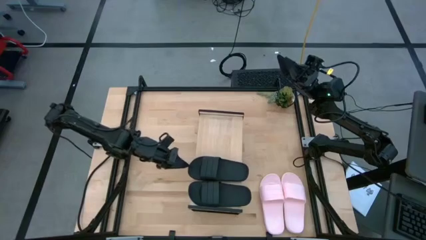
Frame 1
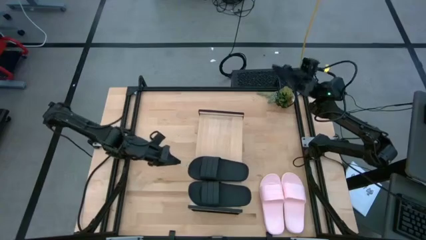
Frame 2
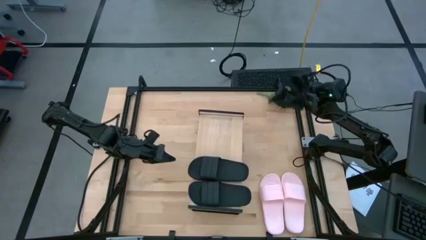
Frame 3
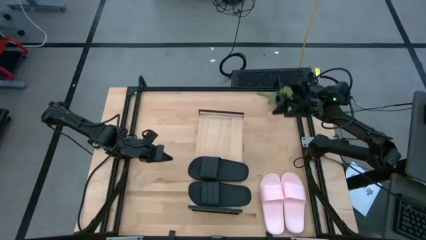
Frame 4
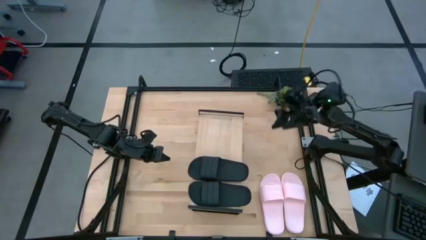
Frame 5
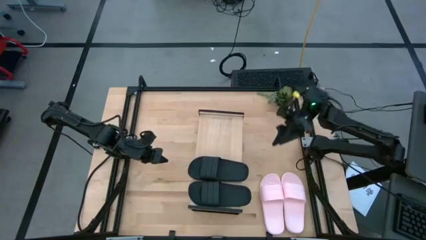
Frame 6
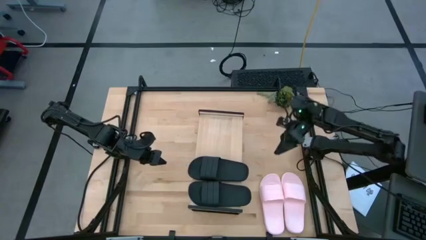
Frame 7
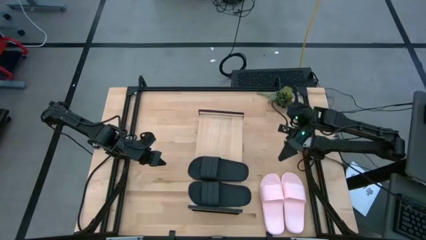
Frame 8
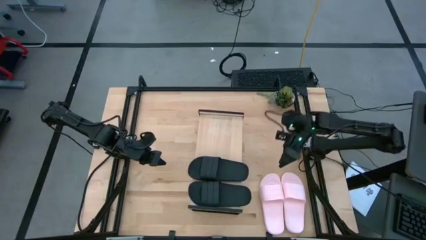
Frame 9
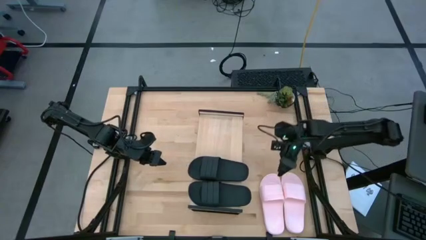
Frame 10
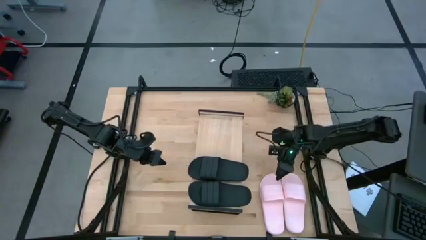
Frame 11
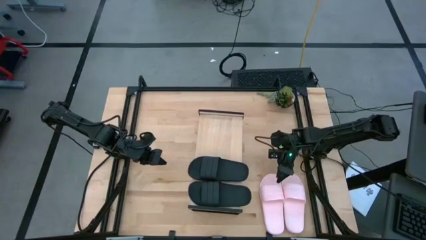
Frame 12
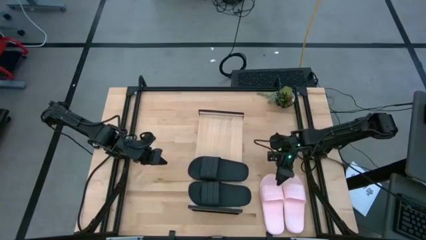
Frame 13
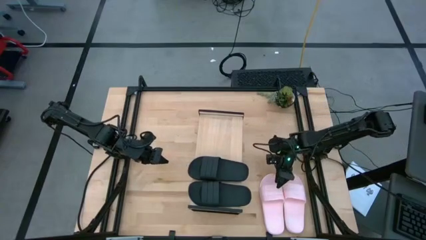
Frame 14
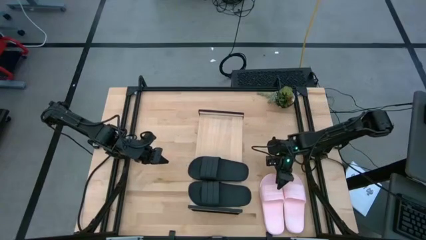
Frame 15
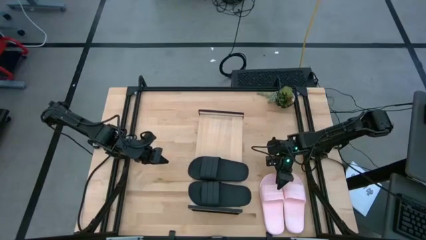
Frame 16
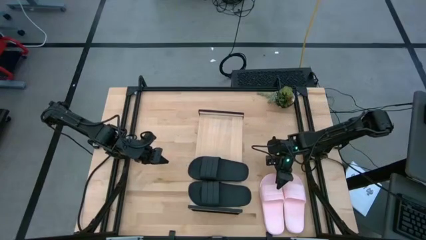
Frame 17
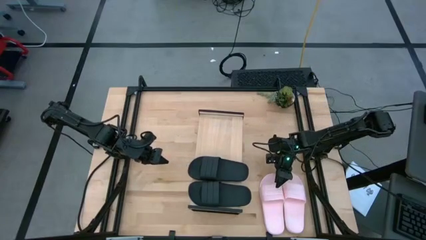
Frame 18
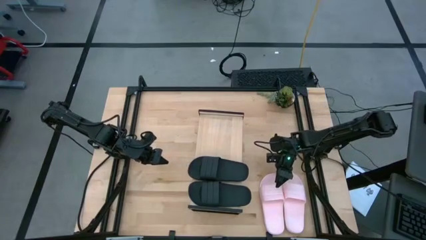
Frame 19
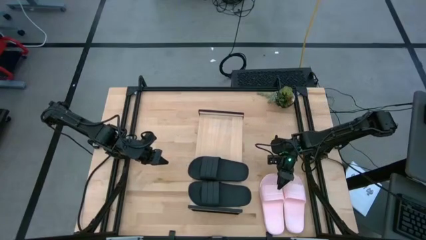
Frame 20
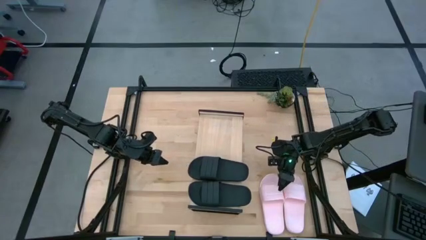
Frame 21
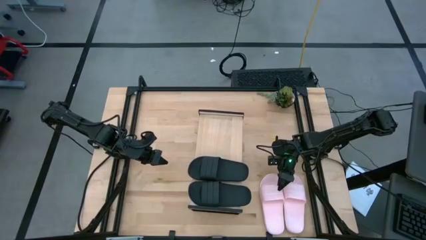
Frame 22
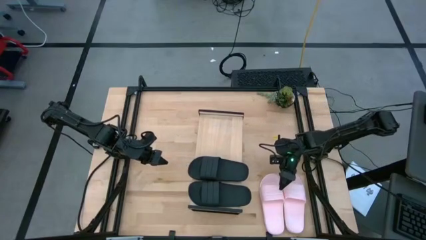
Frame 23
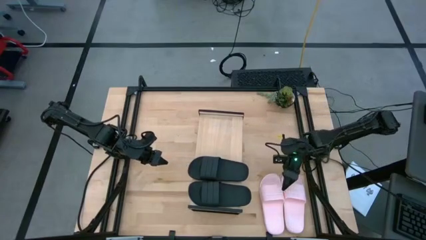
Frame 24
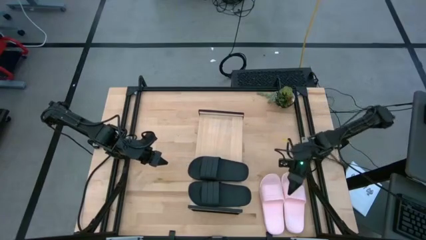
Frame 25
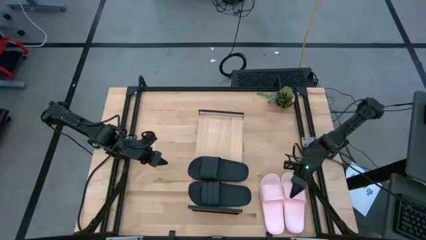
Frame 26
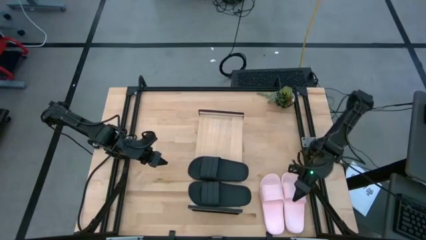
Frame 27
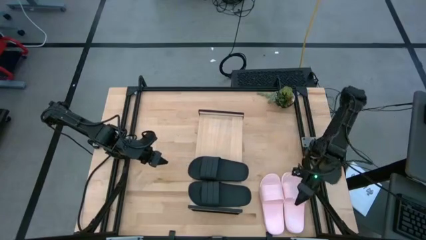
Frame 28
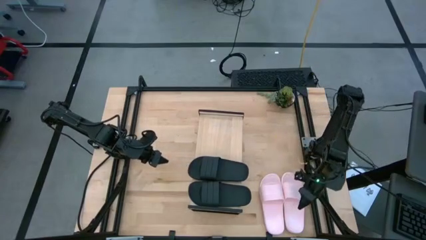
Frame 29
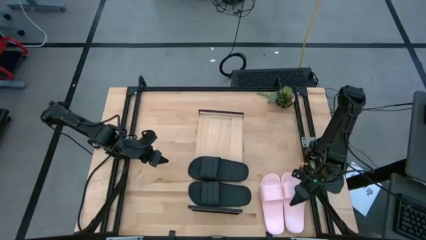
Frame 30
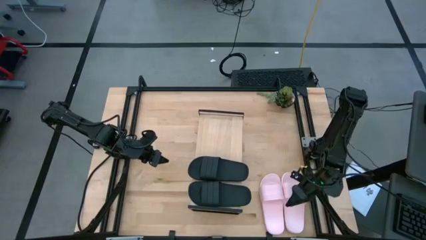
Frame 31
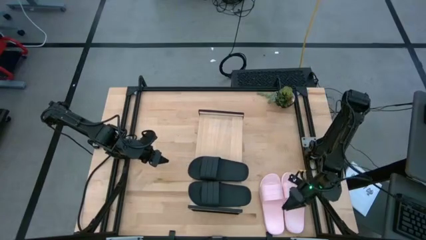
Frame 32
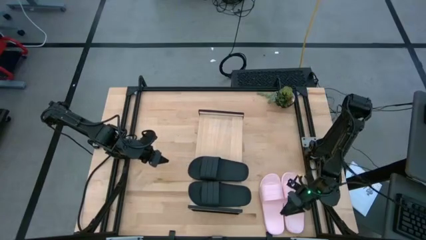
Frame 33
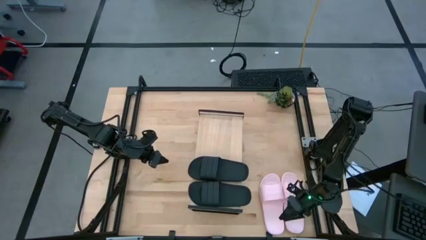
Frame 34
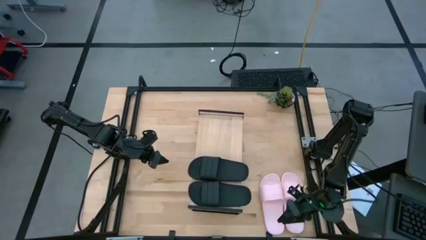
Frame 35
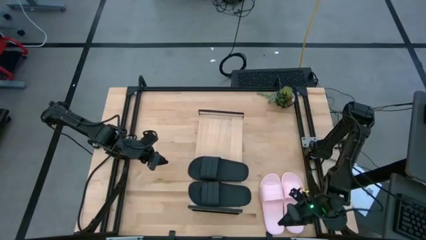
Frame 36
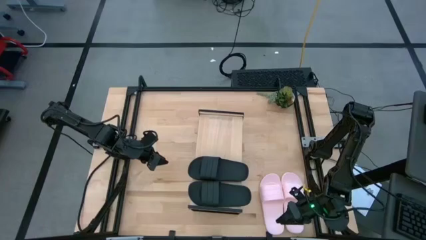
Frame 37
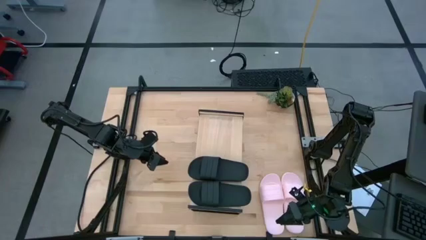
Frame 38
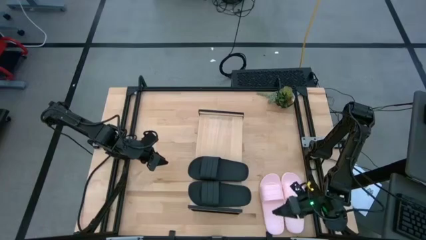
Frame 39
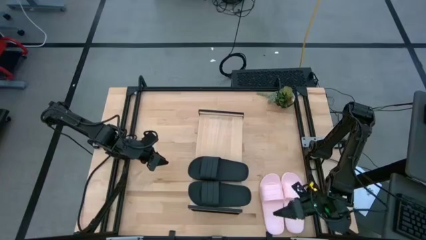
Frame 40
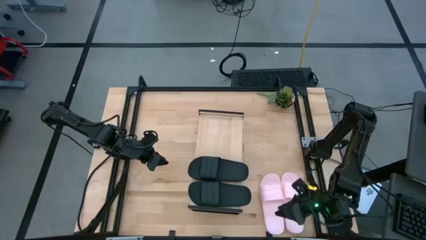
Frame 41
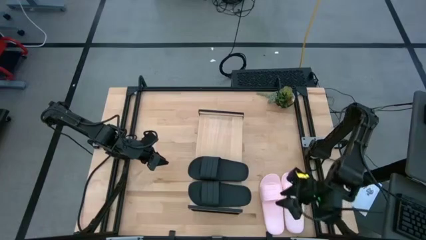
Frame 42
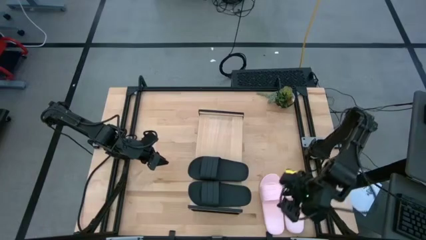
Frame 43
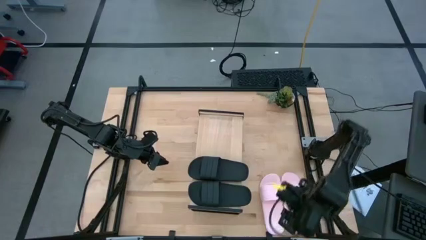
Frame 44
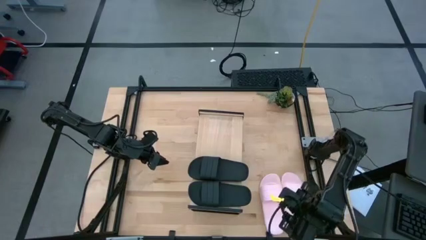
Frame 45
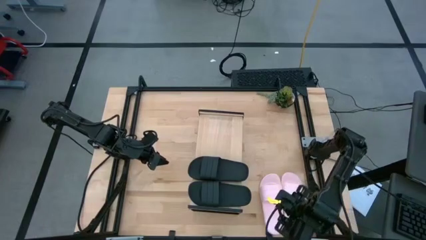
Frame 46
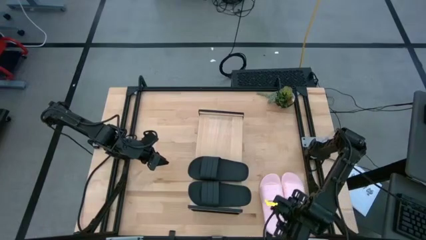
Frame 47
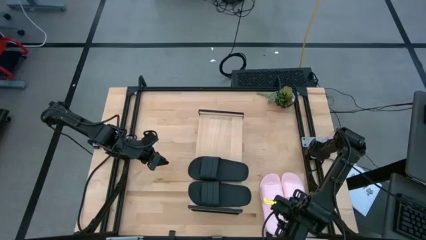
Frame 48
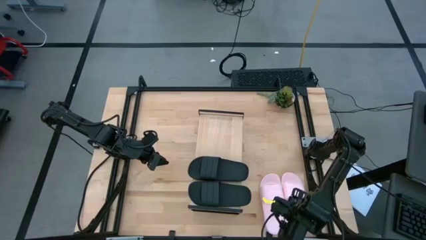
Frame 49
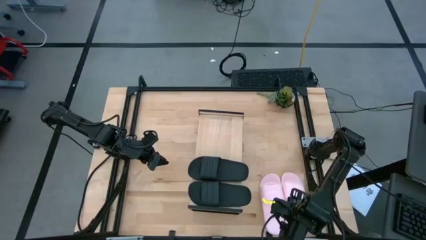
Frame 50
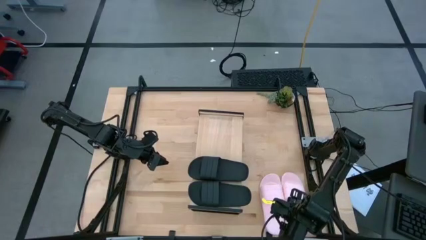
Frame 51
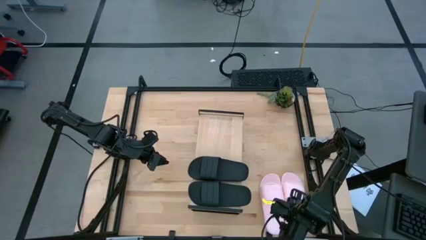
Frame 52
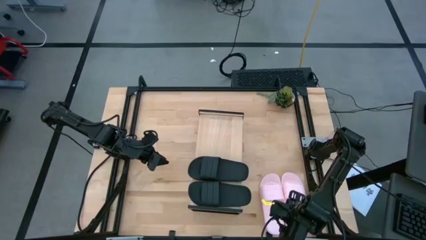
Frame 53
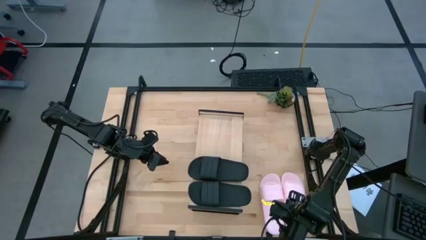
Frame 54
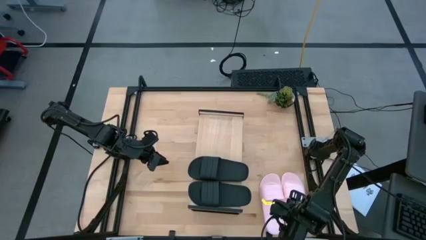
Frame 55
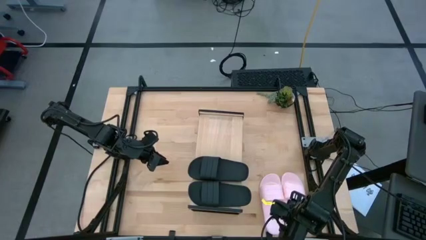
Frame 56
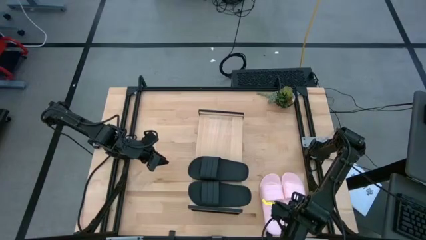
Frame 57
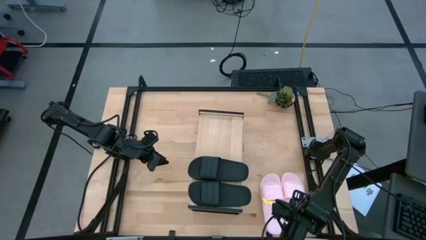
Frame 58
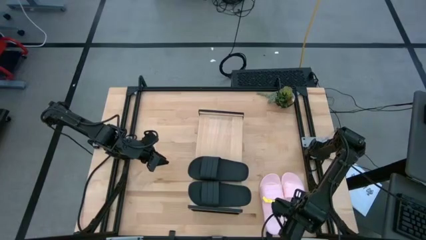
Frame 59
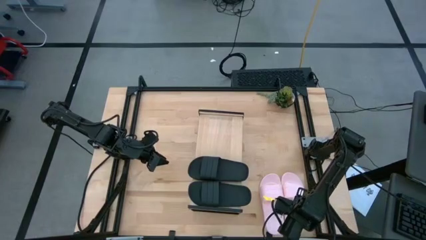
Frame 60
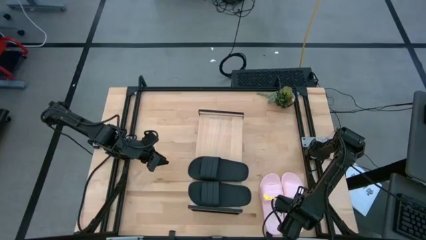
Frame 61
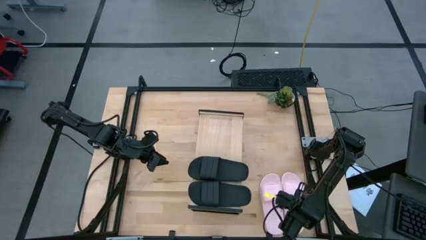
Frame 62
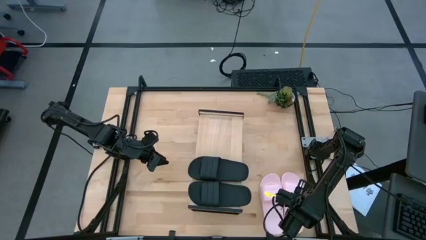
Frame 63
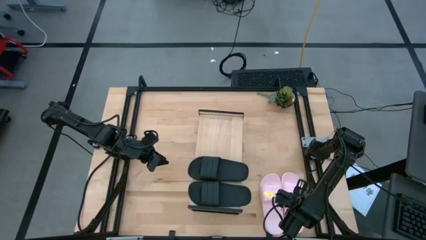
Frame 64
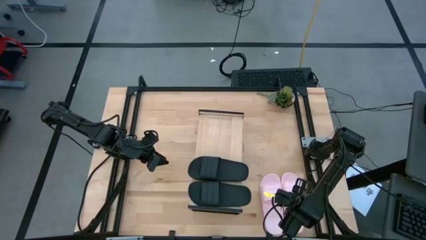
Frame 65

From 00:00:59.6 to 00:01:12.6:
Task: Pick and place slides into the shelf
Put the right pink slipper on the shelf

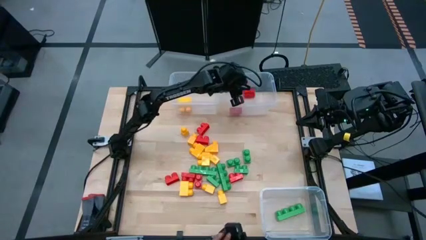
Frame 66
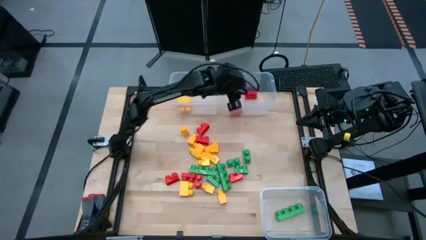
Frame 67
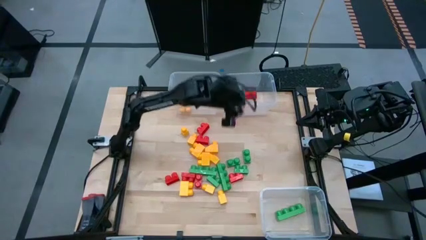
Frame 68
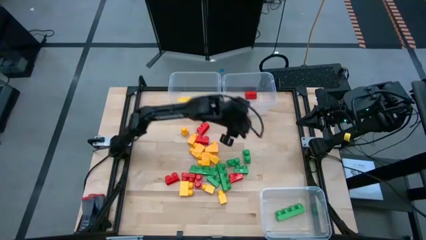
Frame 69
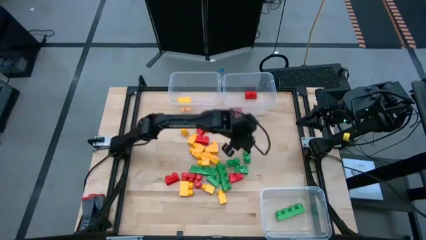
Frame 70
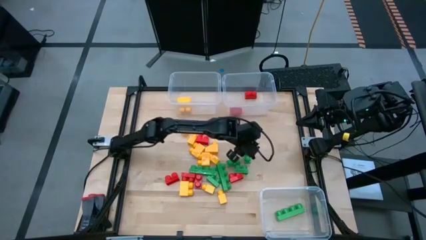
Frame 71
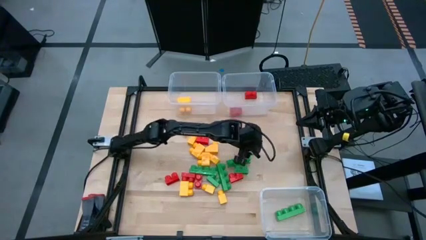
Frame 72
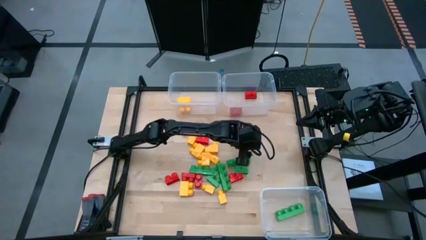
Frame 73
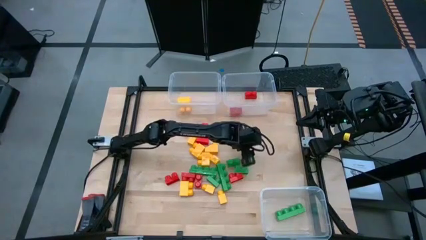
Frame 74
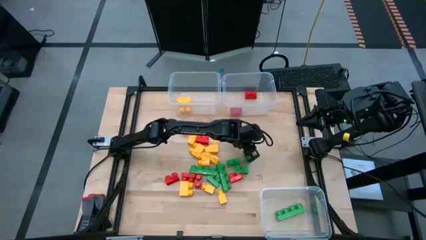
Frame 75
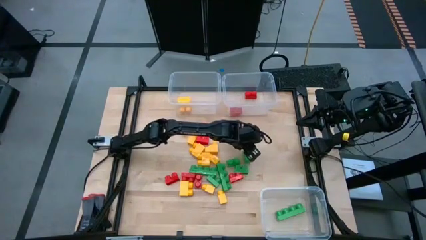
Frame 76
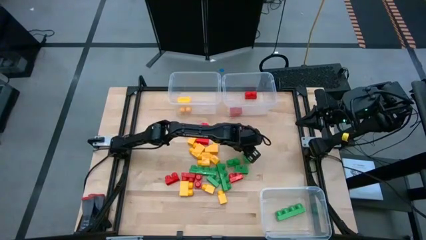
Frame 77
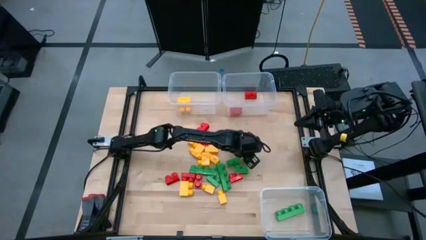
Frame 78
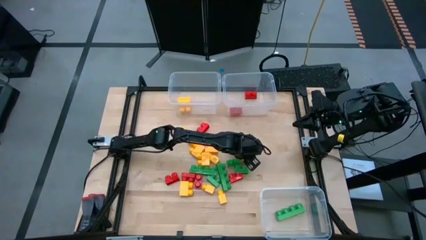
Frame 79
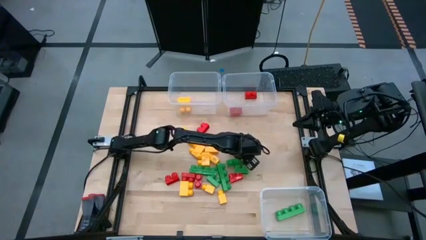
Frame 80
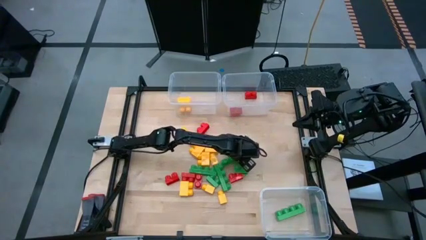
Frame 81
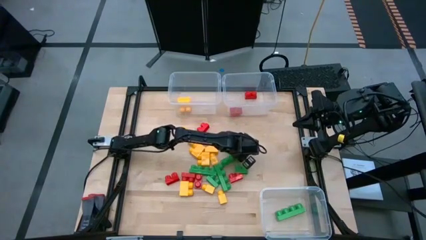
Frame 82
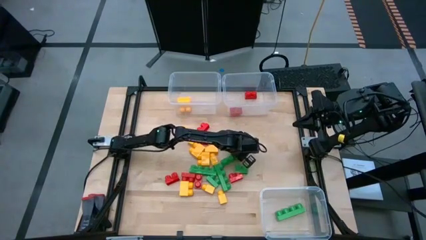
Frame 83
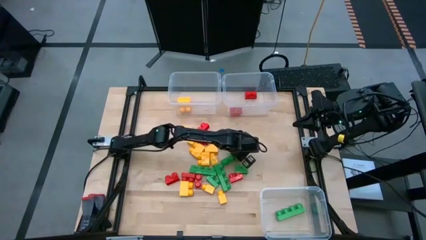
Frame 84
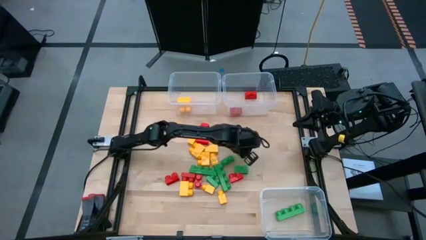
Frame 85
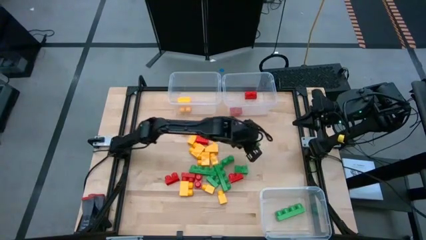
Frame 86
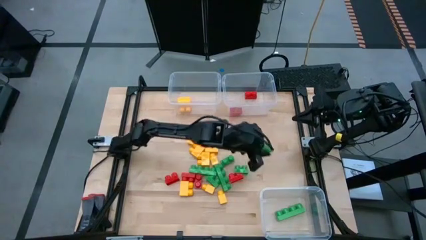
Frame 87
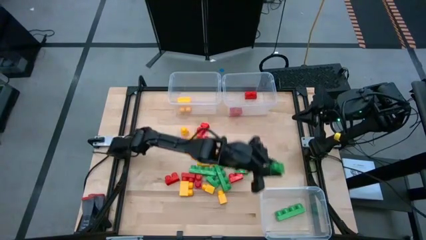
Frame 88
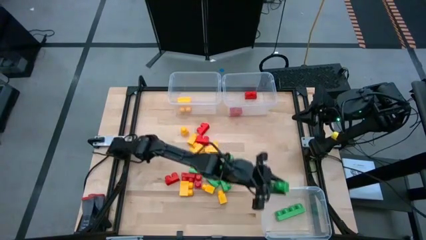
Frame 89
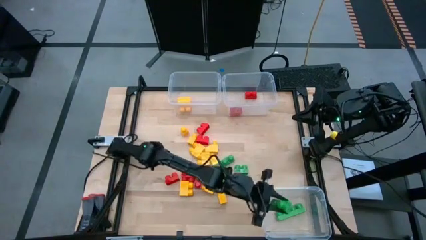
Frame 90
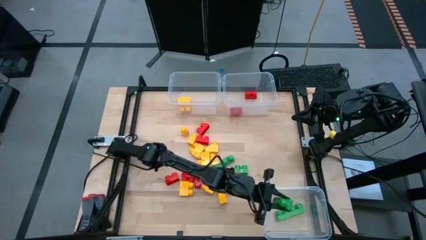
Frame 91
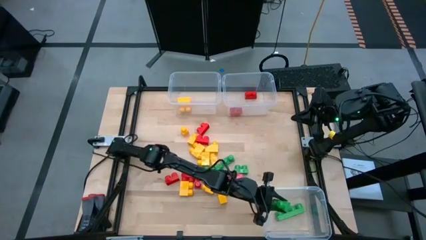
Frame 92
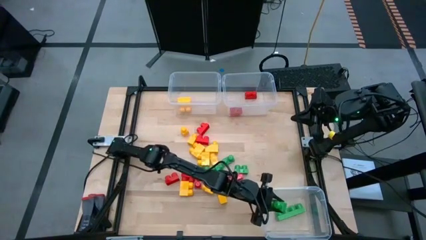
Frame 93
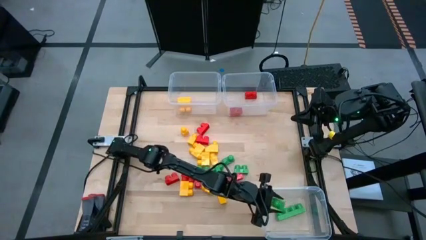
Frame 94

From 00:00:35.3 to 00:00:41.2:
Task: Sort blocks
Put the green piece into the bottom right transparent bin
